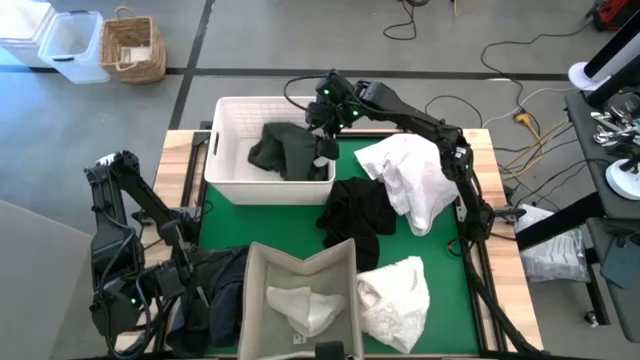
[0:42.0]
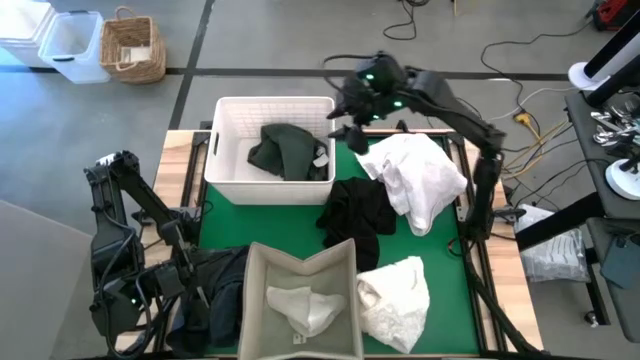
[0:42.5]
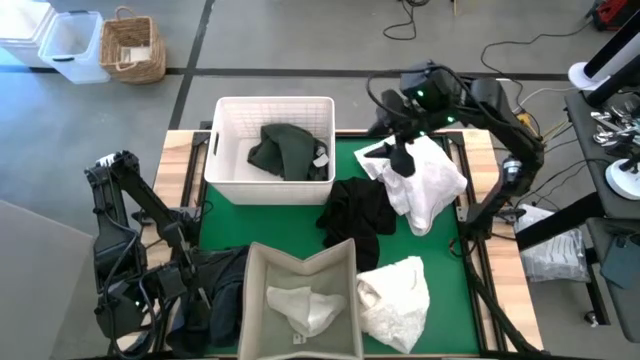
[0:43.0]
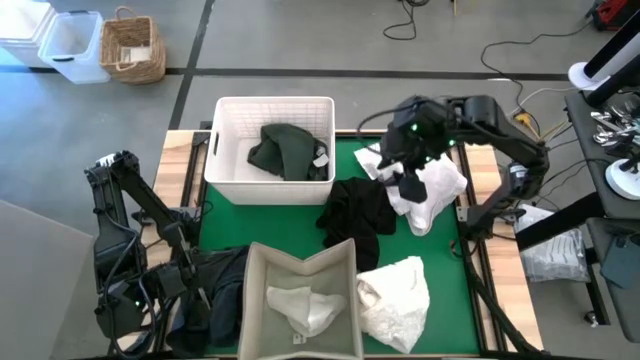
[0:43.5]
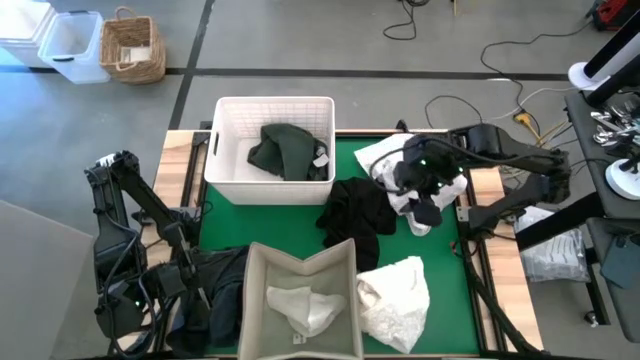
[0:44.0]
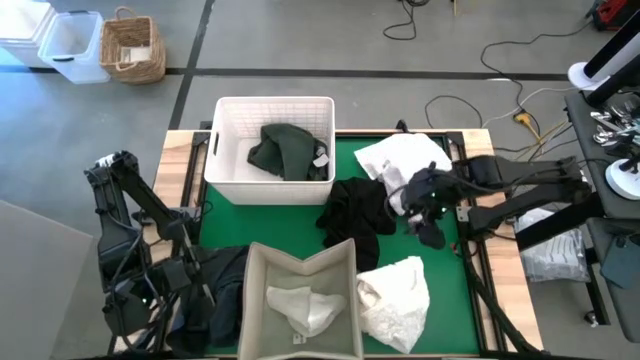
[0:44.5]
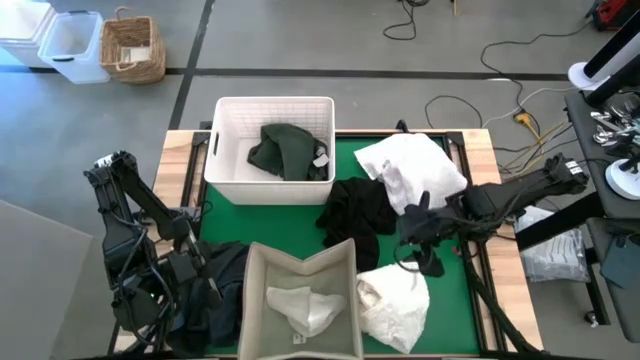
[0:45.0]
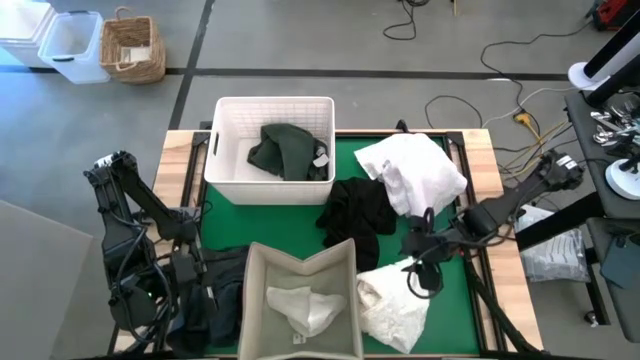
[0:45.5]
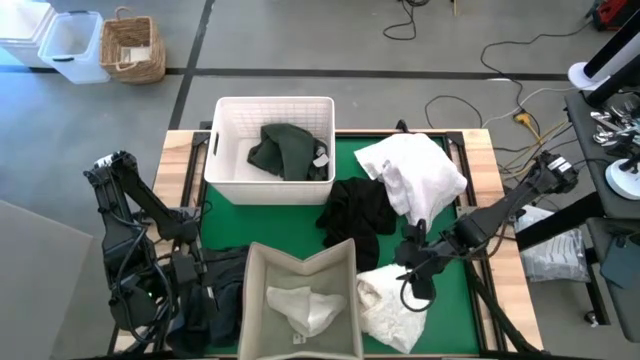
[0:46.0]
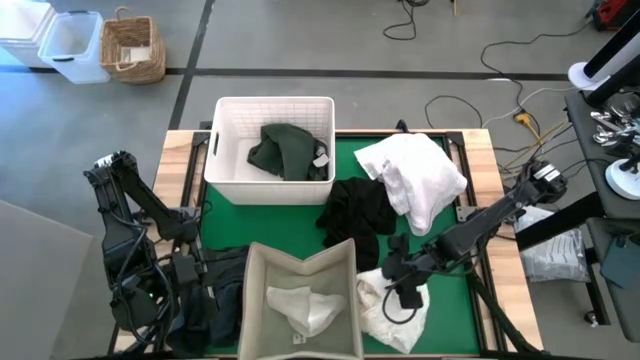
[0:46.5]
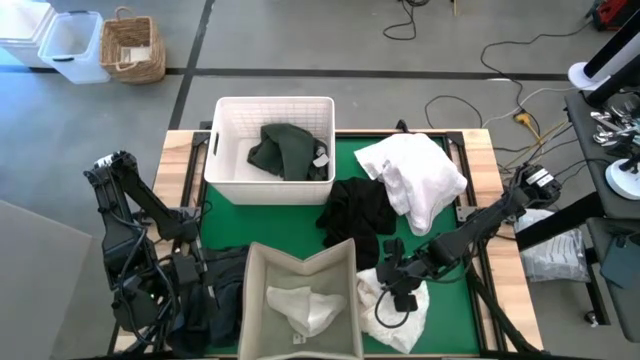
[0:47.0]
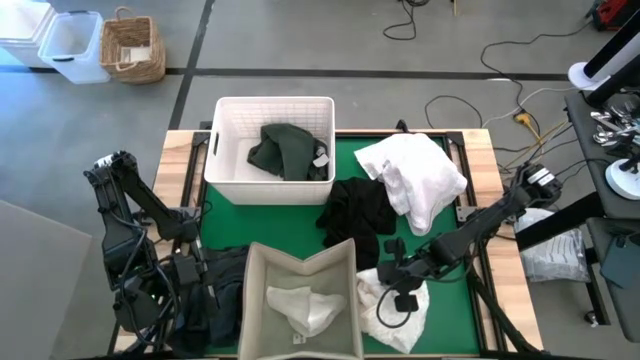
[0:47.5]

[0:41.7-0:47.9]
Put the white dress into the brown laundry organizer

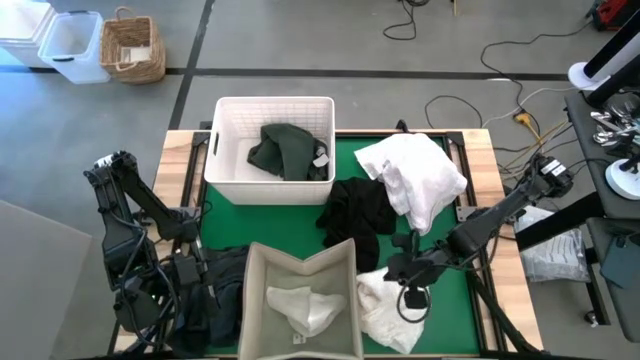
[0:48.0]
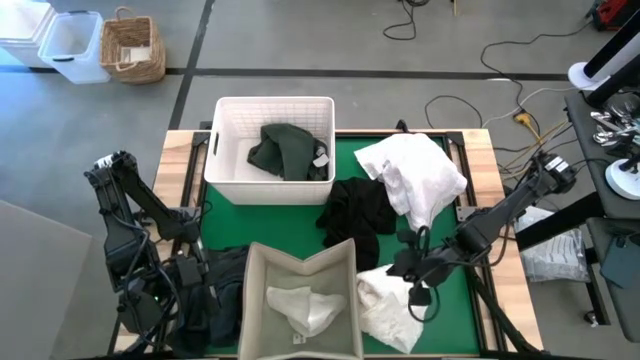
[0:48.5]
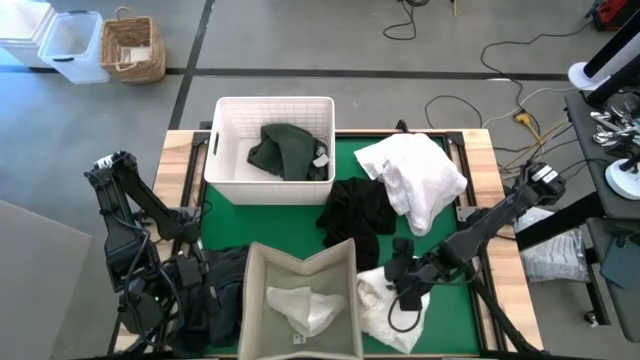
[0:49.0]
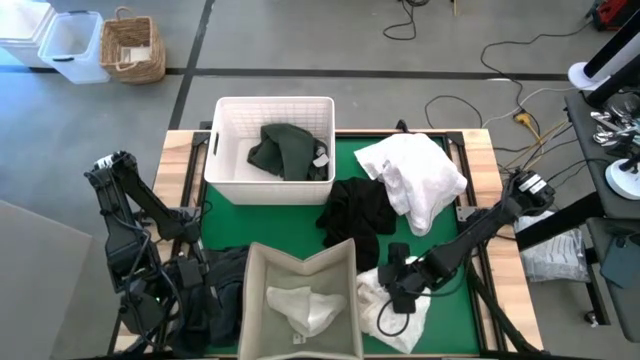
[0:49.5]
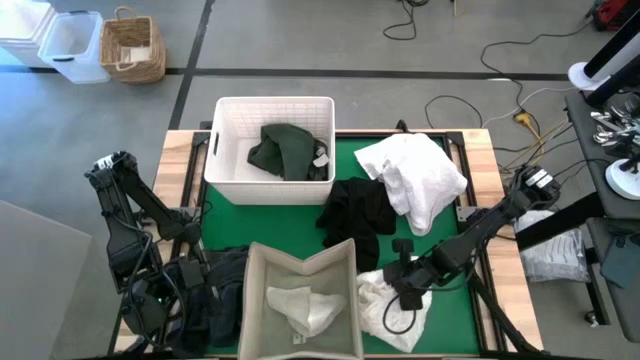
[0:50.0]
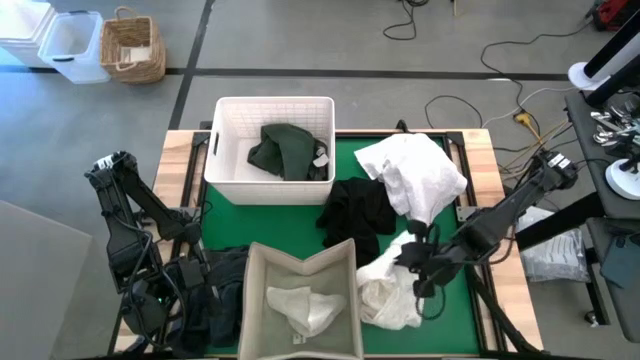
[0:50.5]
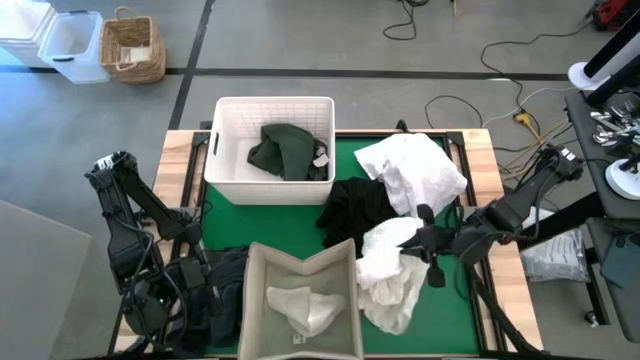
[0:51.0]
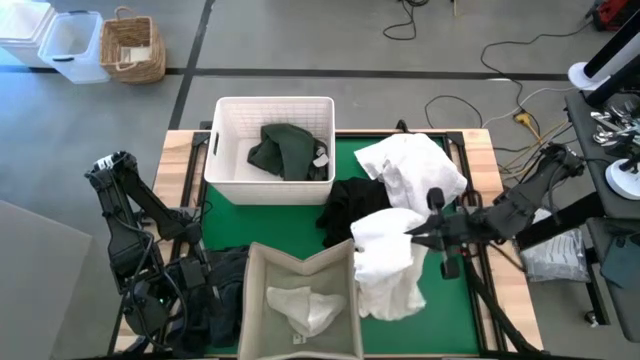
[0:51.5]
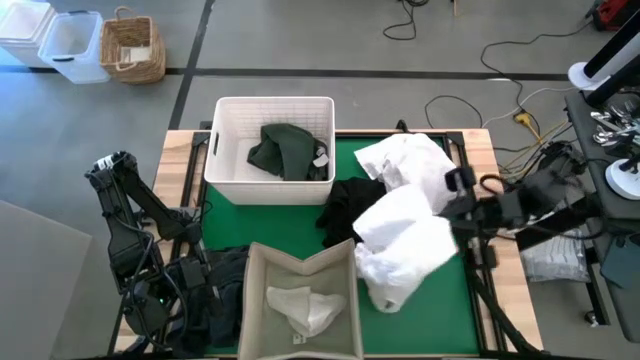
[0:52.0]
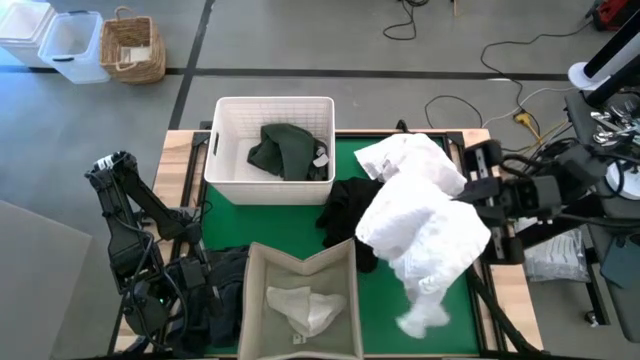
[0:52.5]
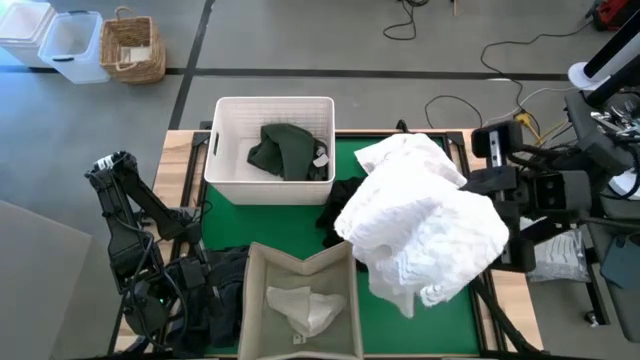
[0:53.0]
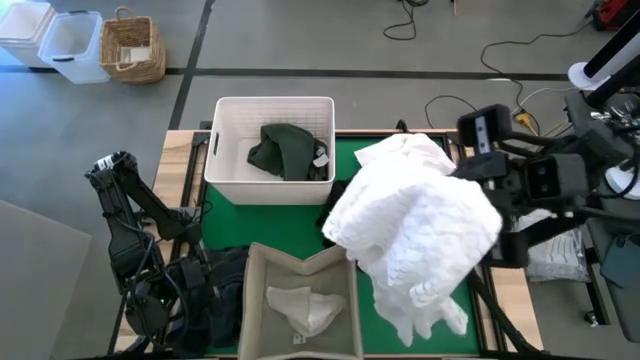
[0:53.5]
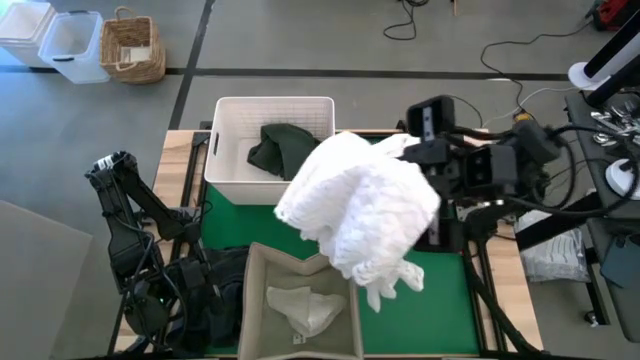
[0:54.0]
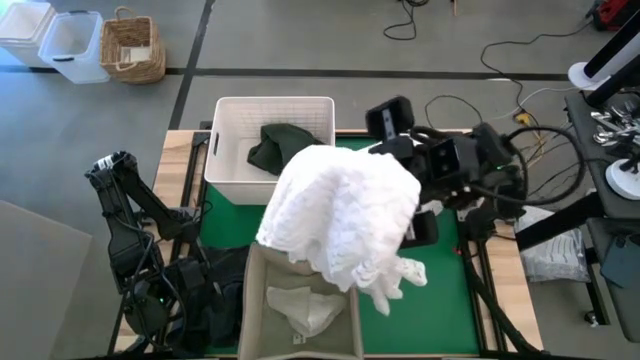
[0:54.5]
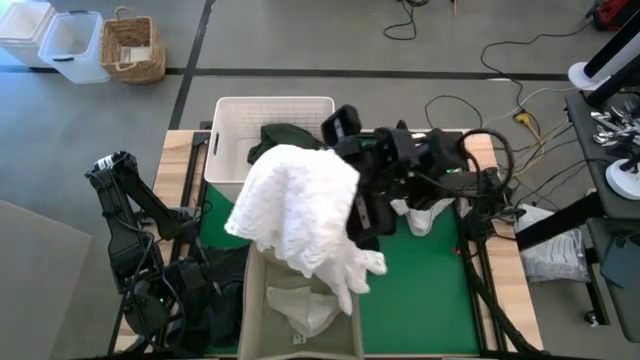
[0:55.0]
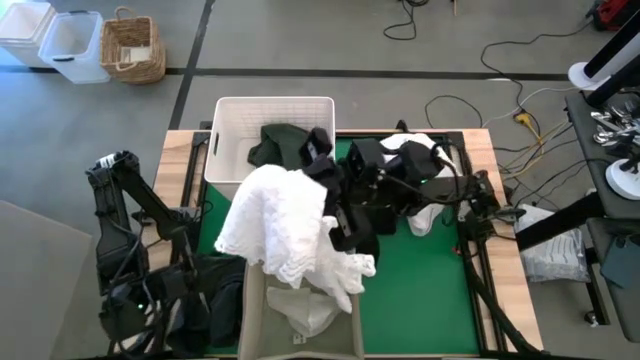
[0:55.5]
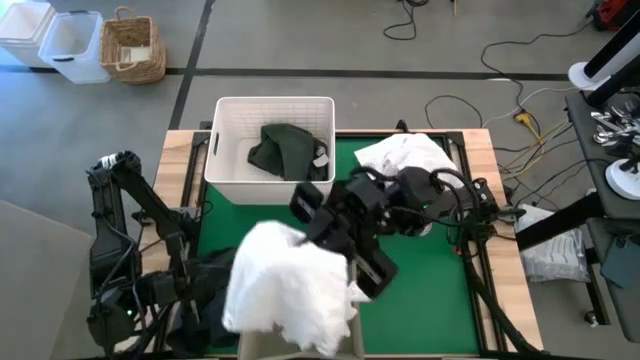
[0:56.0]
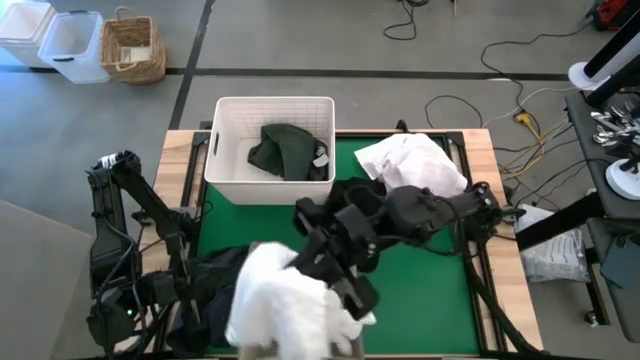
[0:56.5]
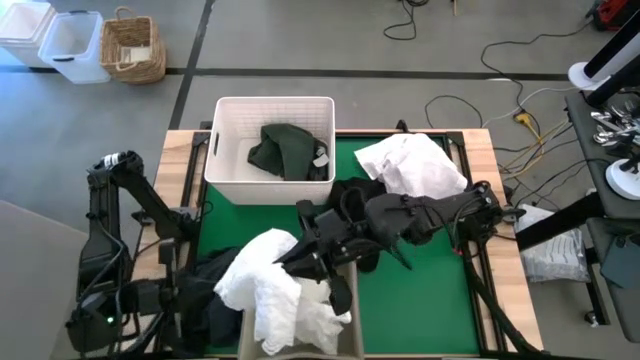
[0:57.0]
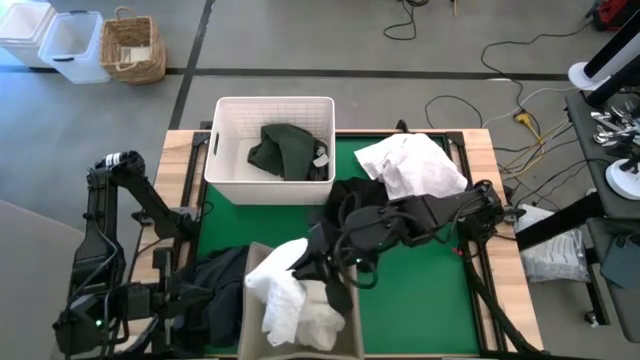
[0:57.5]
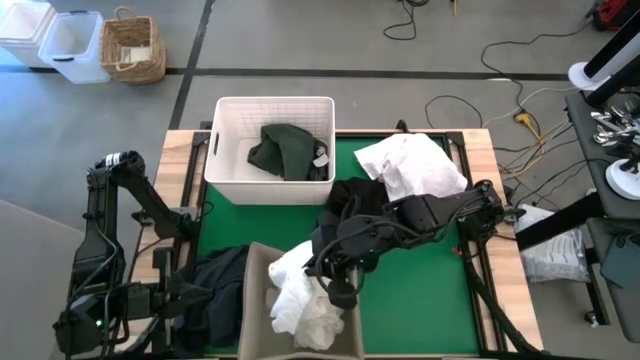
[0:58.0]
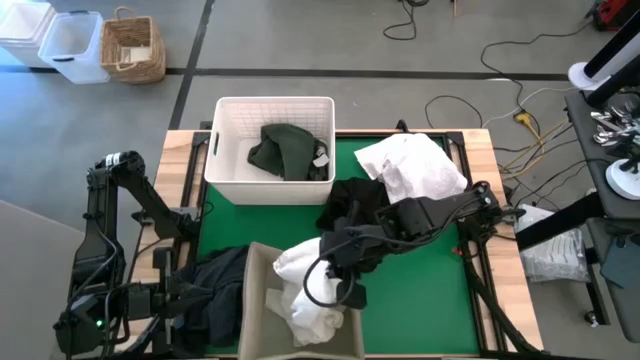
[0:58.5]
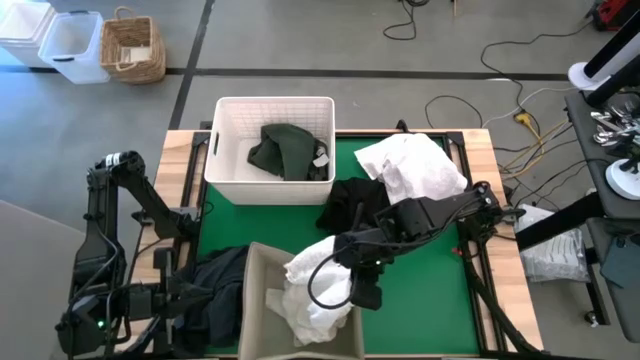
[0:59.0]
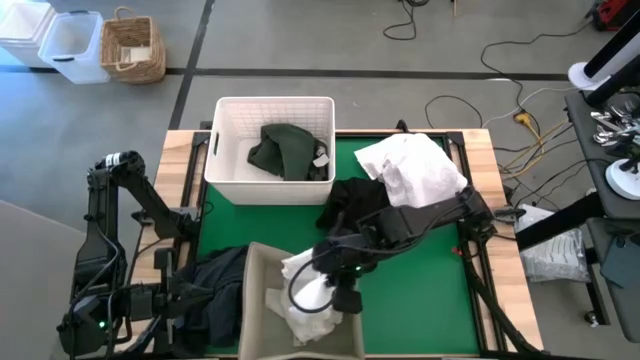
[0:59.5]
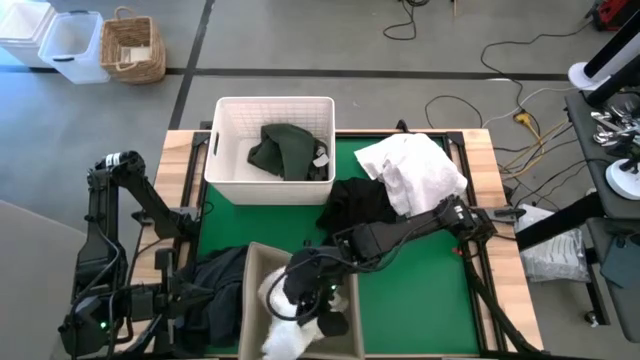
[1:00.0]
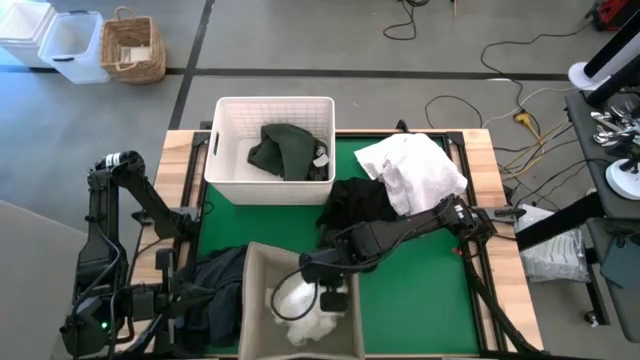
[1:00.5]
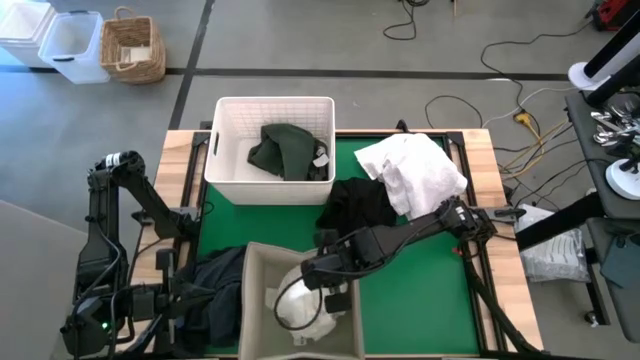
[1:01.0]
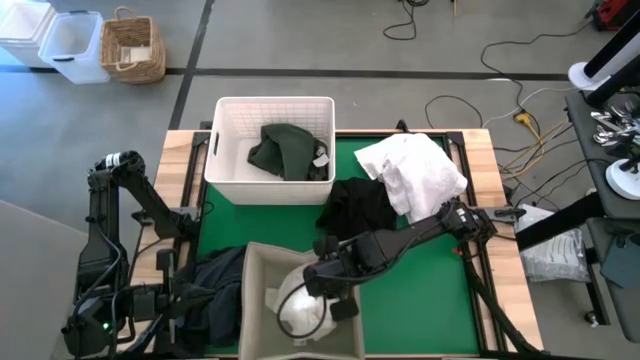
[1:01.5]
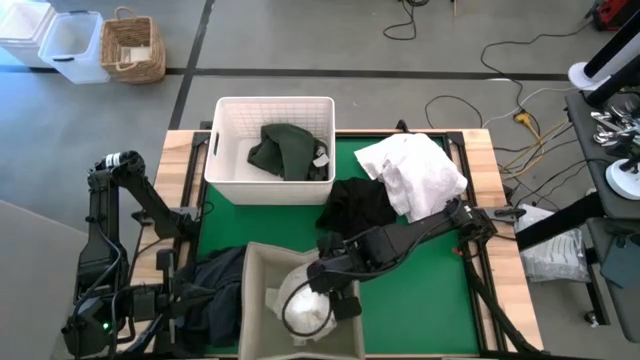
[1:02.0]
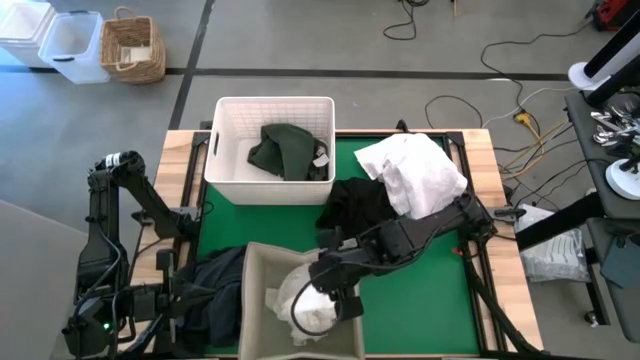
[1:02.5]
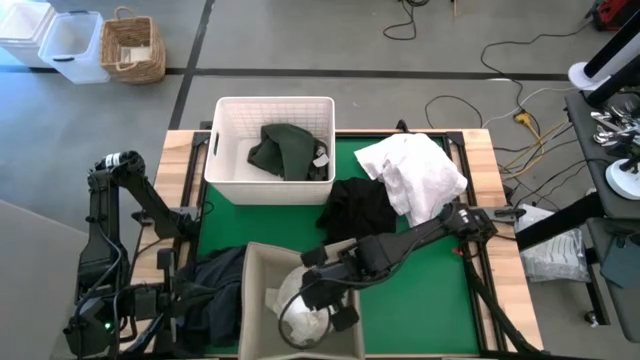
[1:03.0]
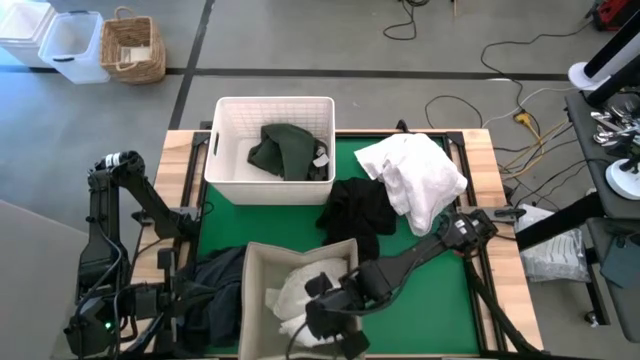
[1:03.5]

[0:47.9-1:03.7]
Put the white dress into the brown laundry organizer
